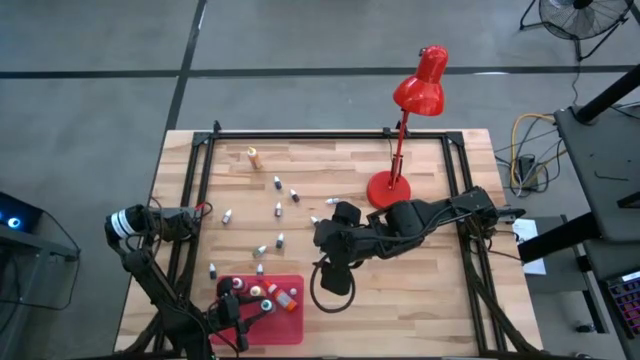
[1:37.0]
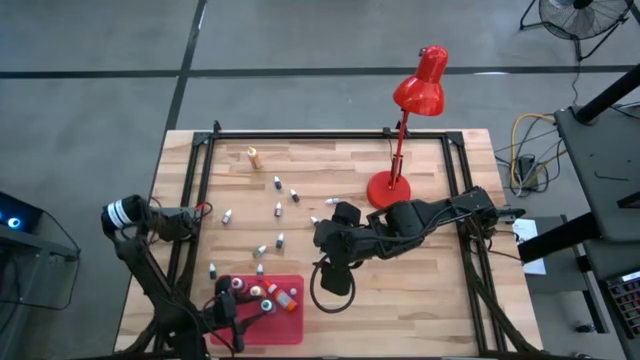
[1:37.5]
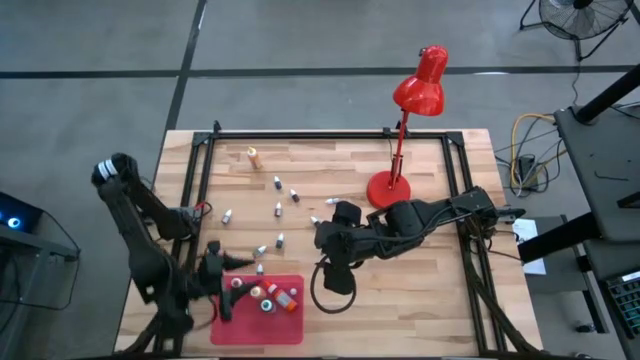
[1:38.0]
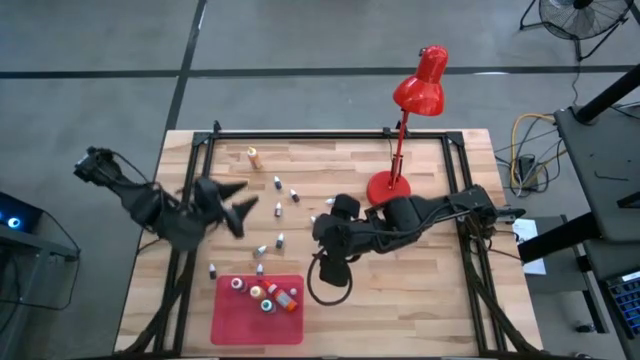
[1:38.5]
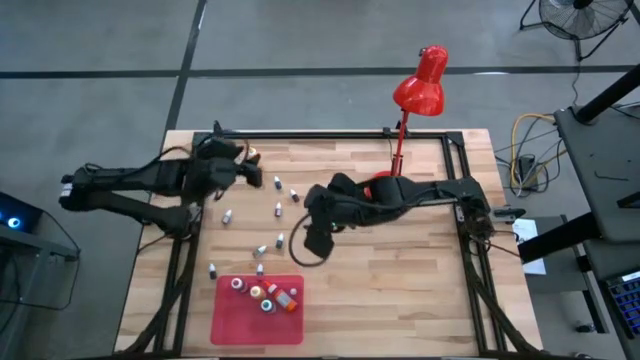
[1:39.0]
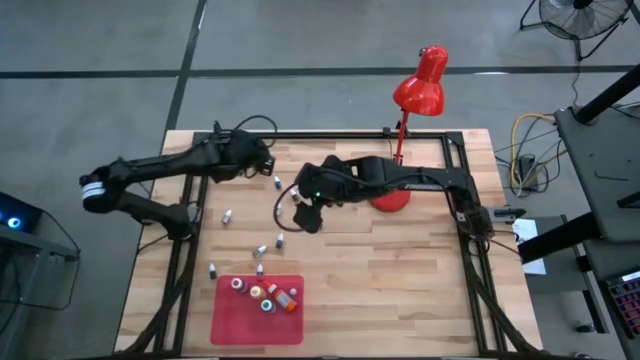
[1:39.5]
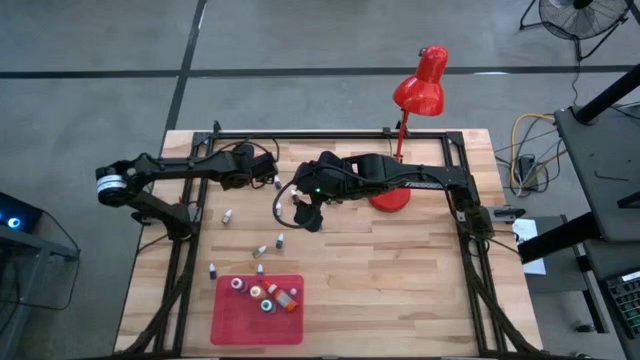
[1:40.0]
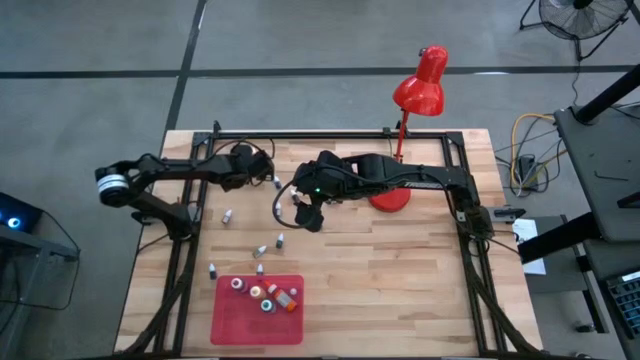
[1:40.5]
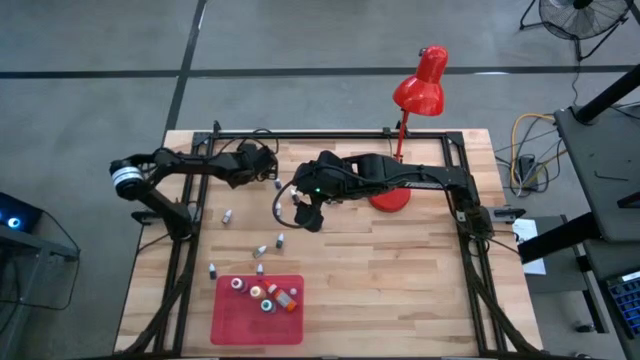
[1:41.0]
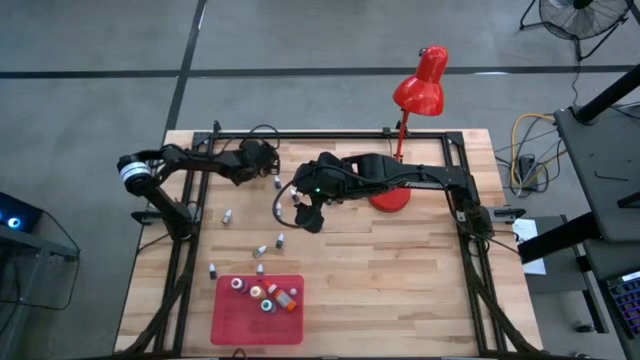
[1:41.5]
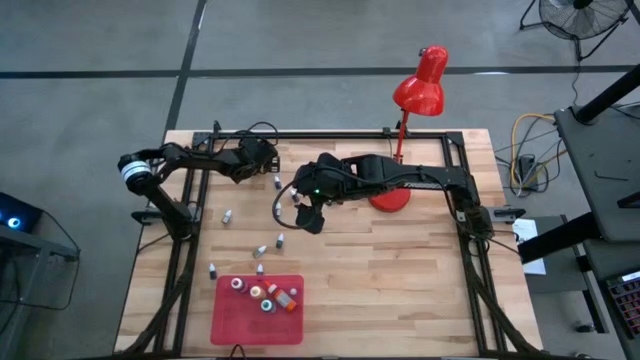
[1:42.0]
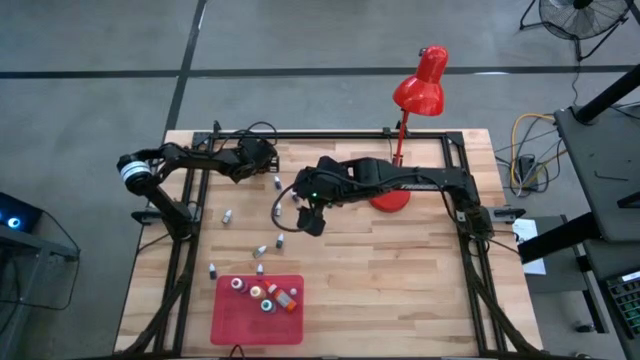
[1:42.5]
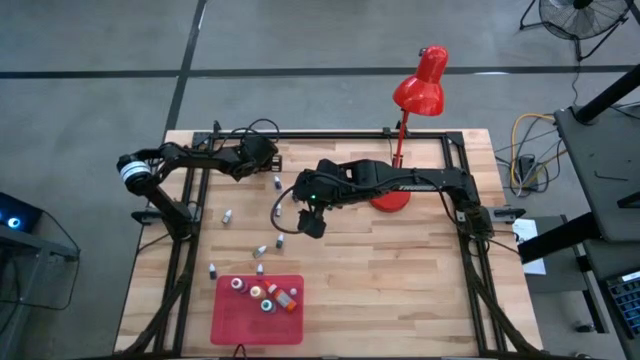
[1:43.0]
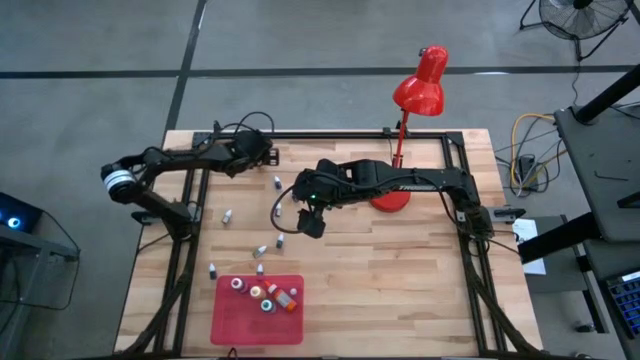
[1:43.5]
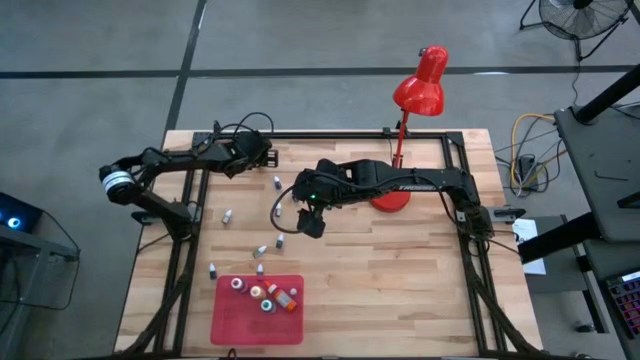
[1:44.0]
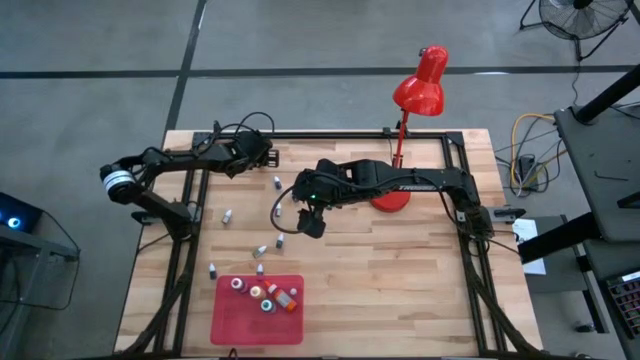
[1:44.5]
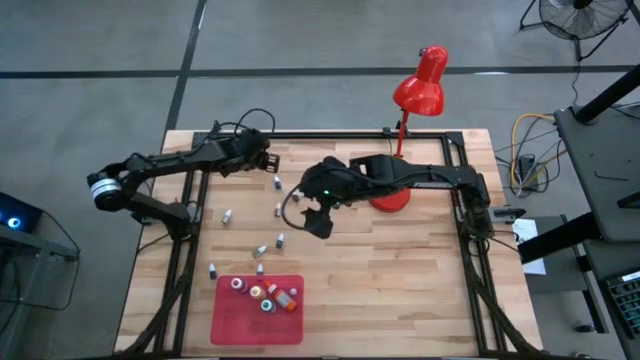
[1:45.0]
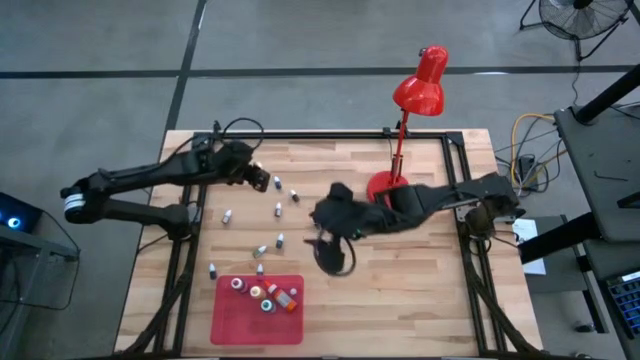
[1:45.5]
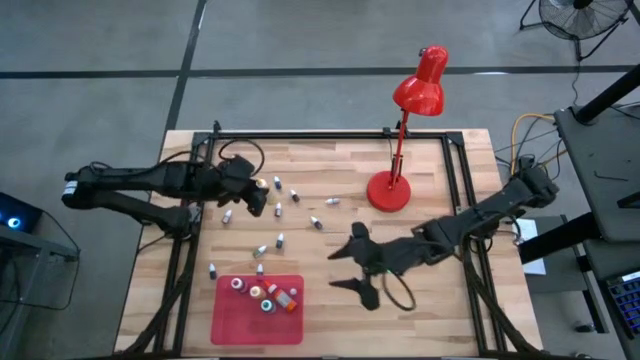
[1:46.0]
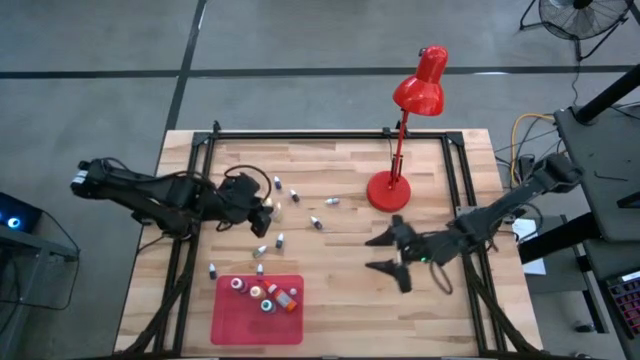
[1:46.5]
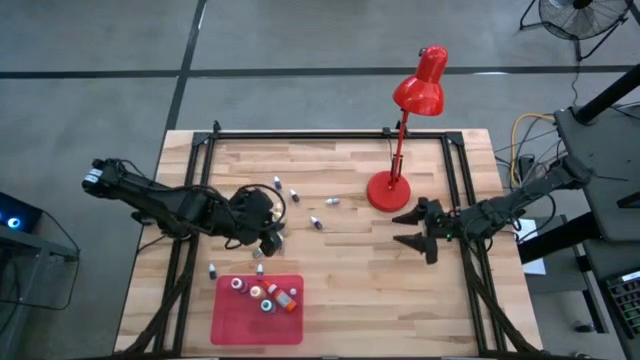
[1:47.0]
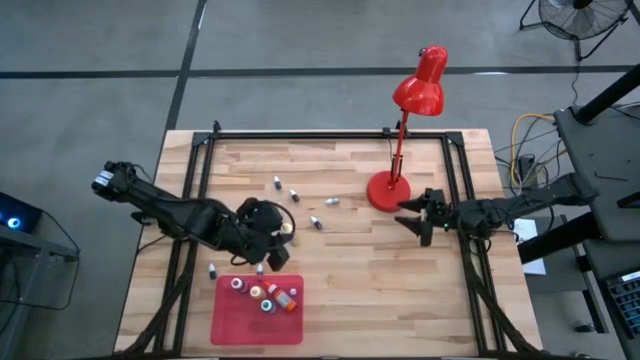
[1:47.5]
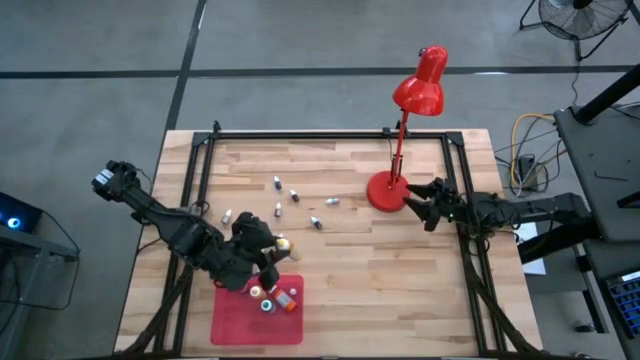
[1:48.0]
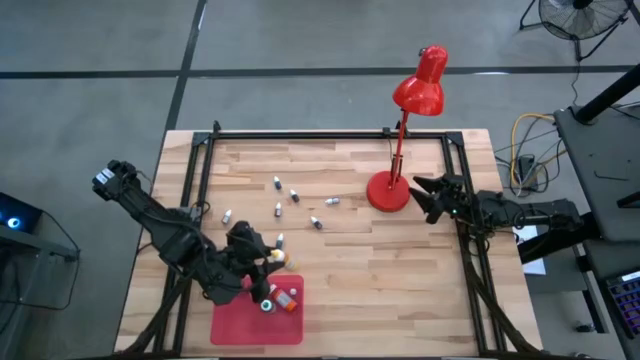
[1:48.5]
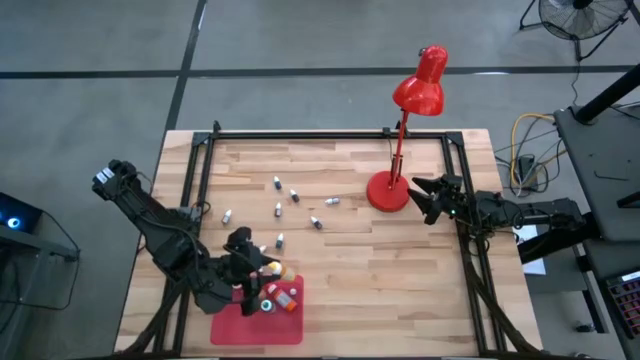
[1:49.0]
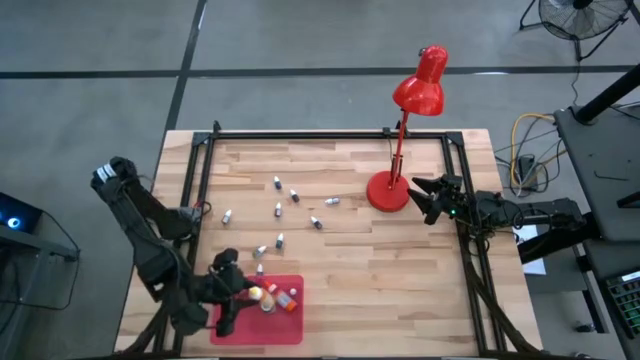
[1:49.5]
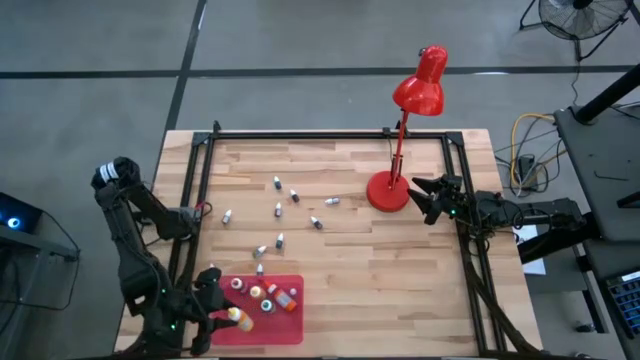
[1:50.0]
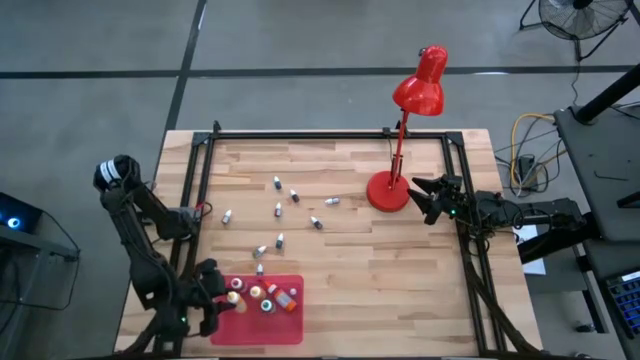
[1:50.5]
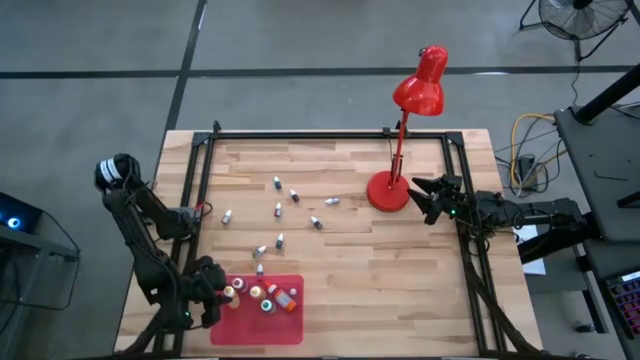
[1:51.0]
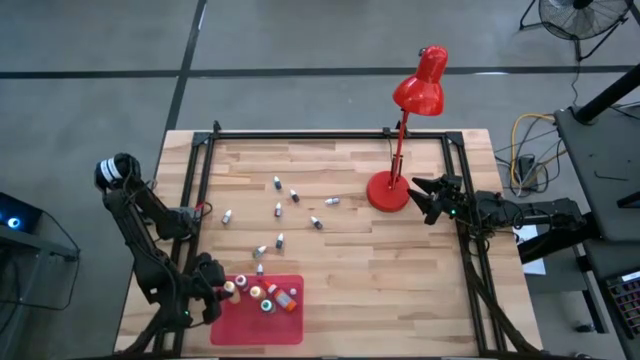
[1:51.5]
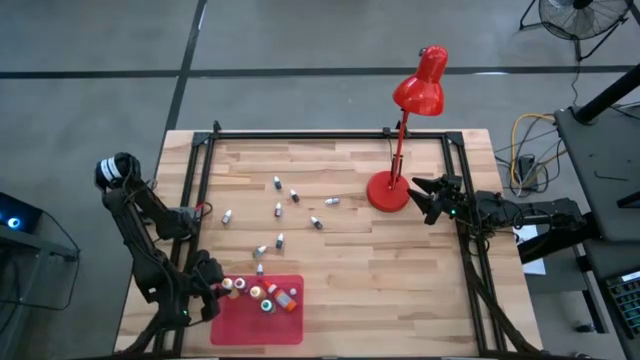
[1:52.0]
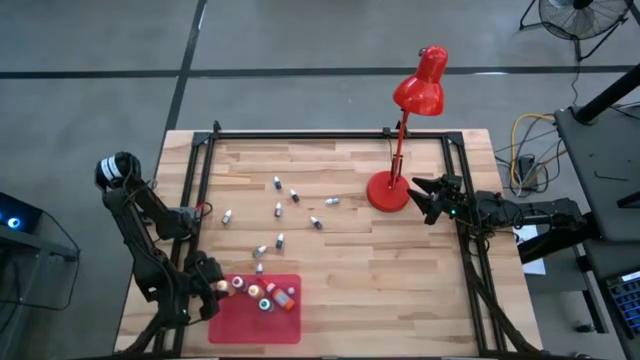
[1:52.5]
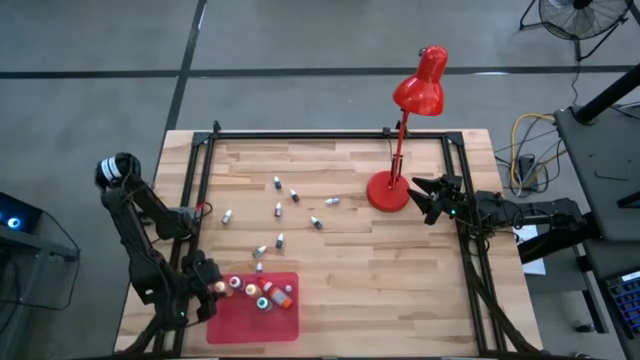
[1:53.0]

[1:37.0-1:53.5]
Task: Pick & Place food coloring
Put the large yellow food coloring bottle into the red bin

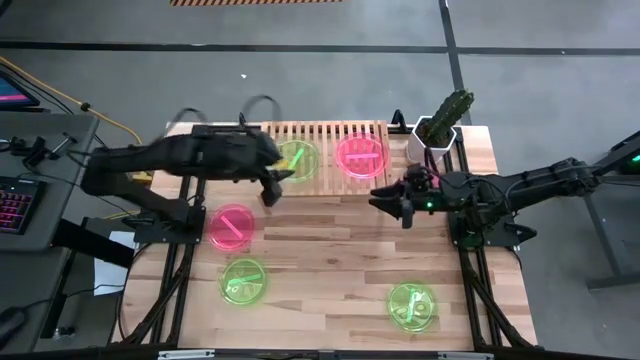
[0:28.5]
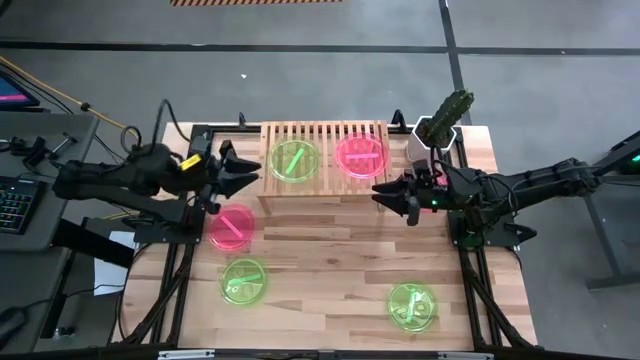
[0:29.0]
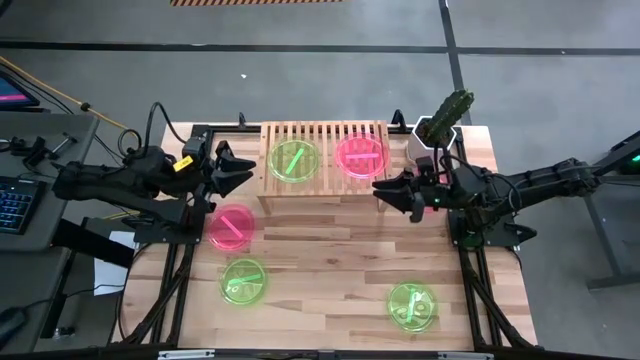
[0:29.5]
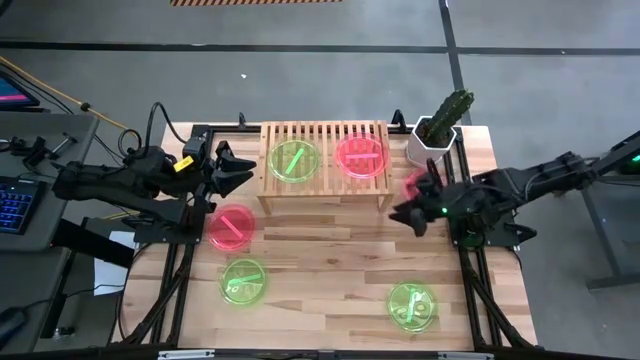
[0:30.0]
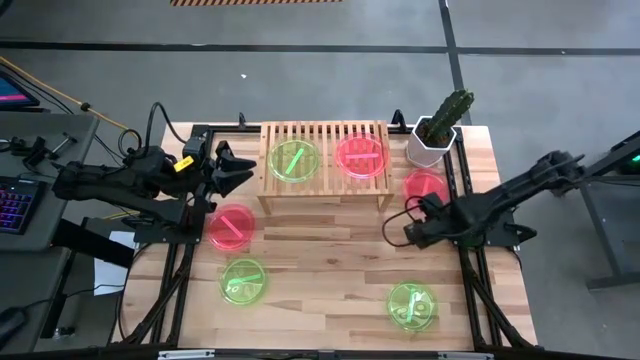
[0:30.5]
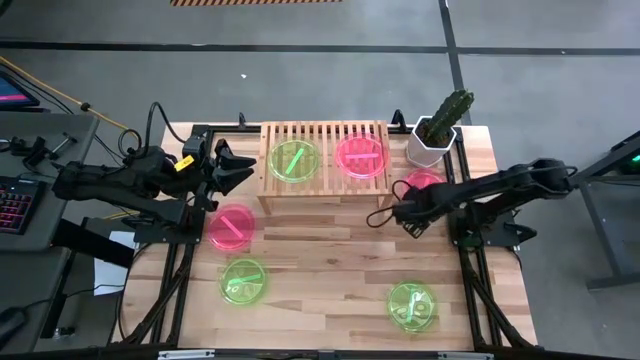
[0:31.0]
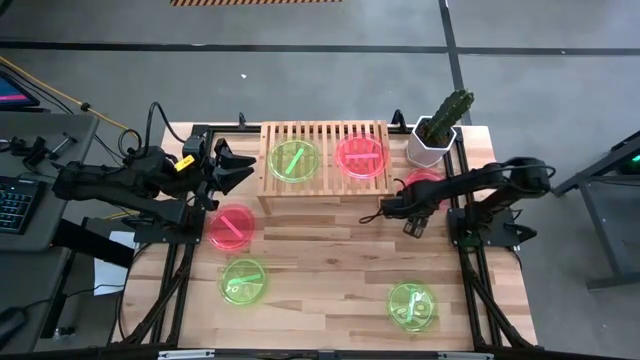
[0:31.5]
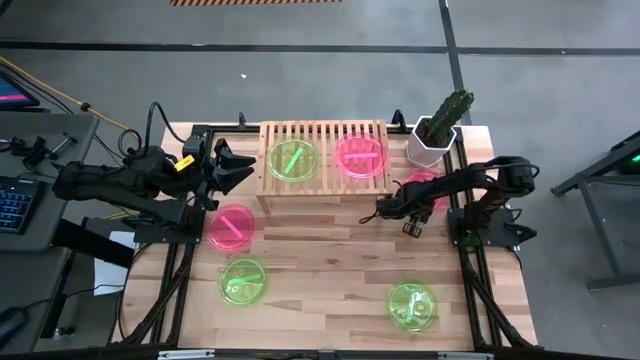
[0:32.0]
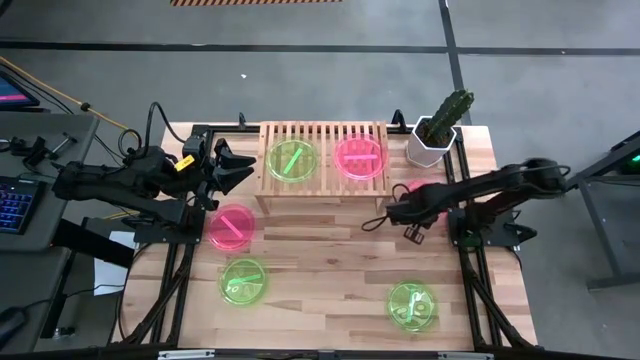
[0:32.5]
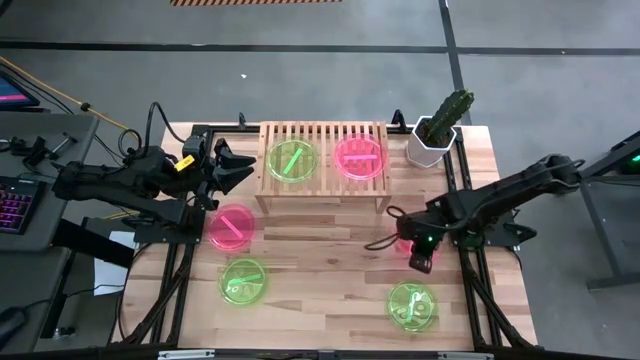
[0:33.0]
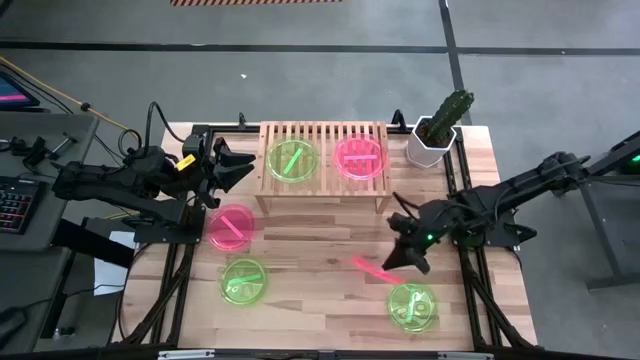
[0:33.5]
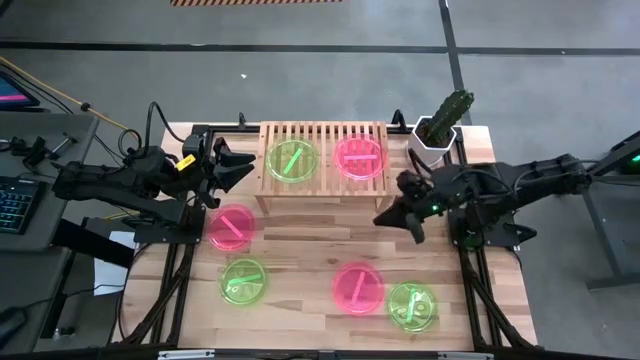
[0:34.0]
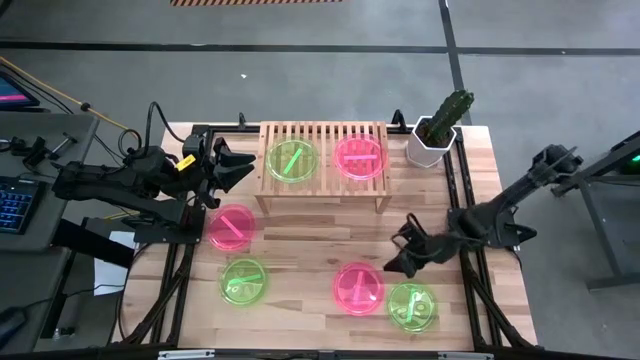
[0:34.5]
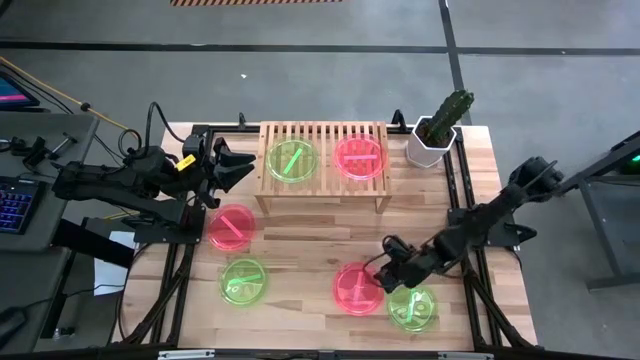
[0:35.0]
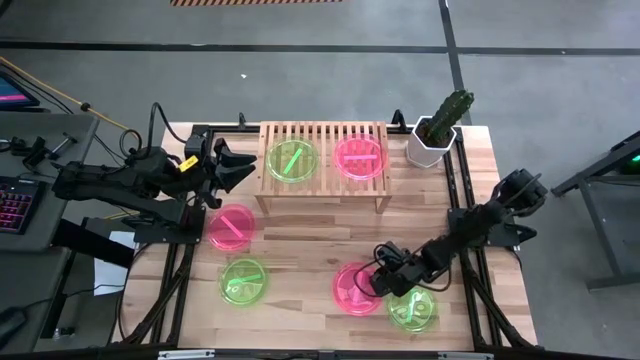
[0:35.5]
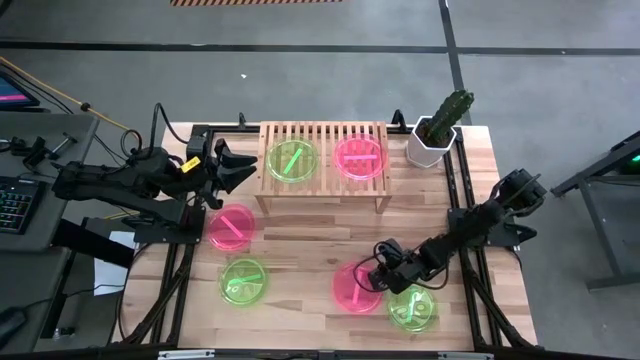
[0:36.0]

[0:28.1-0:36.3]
Task: Place and stack plates onto a shelf
Stack the right pink transparent plate on top of the pink transparent plate on the shelf
